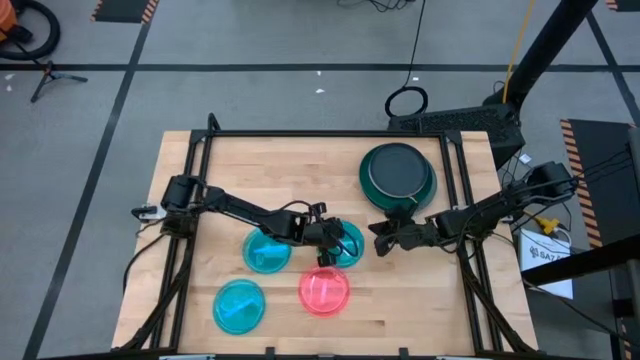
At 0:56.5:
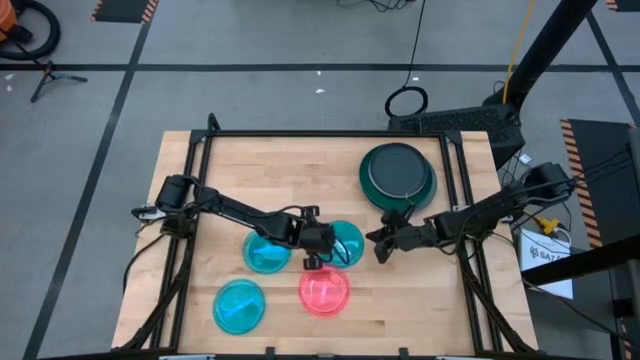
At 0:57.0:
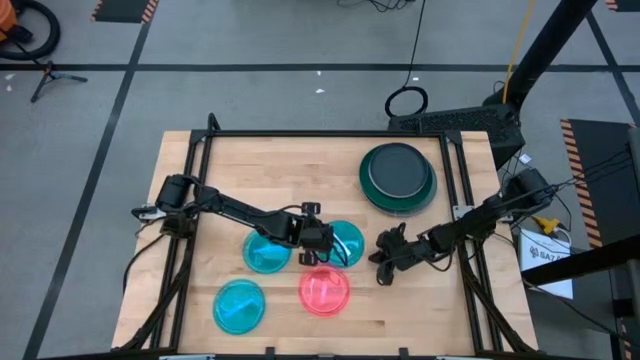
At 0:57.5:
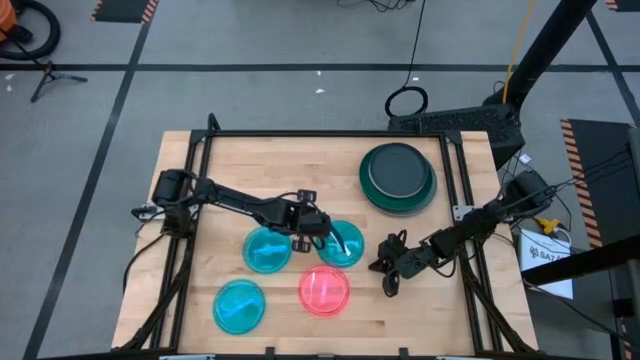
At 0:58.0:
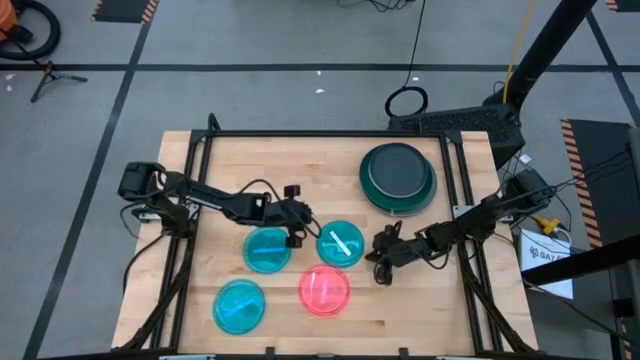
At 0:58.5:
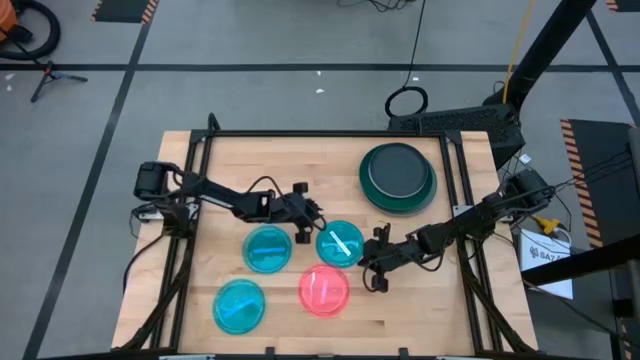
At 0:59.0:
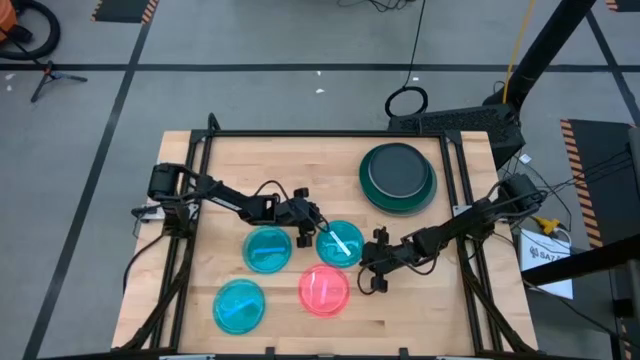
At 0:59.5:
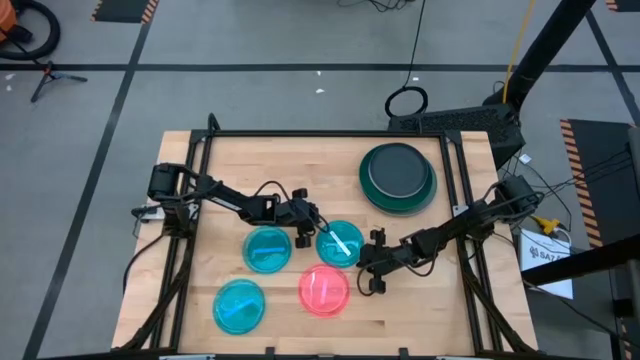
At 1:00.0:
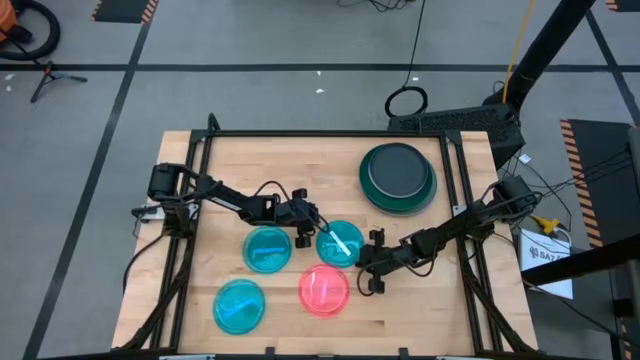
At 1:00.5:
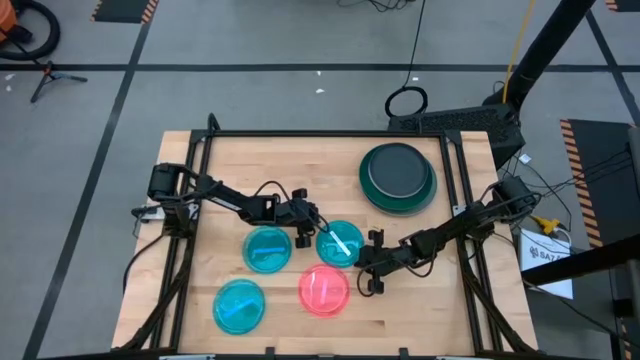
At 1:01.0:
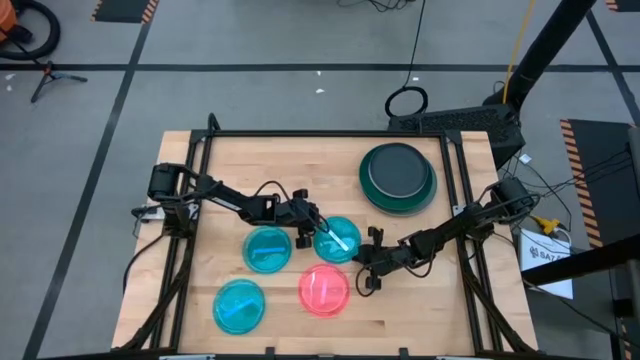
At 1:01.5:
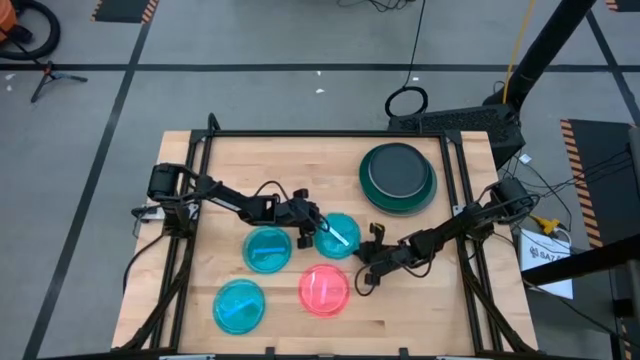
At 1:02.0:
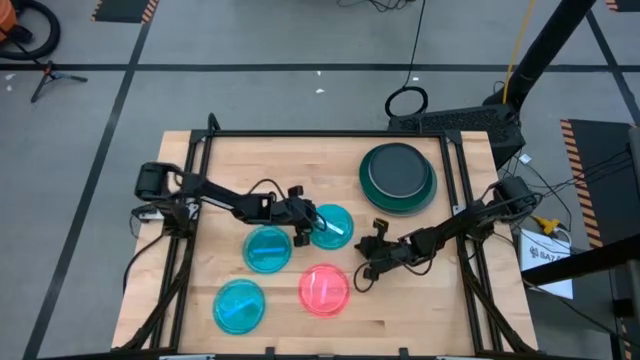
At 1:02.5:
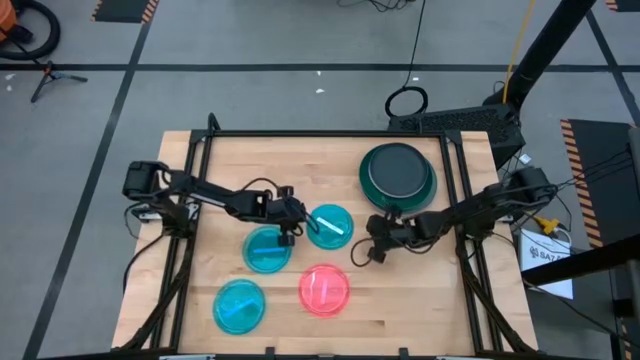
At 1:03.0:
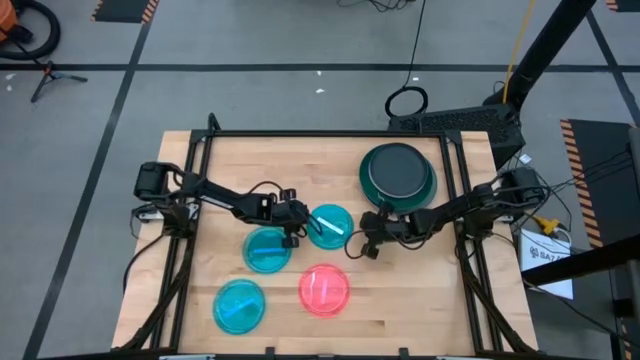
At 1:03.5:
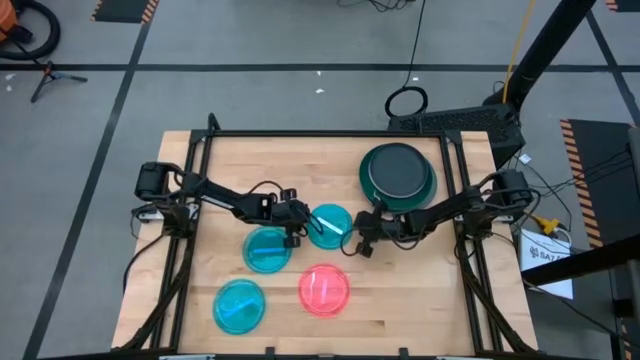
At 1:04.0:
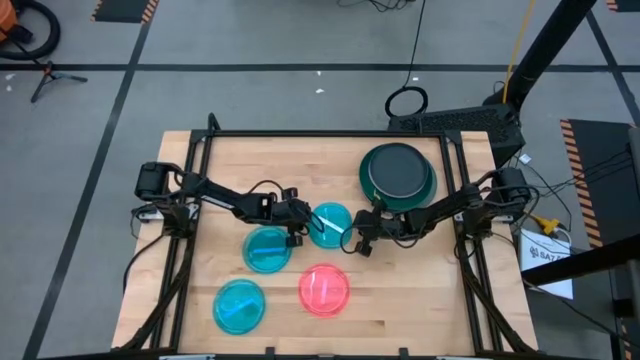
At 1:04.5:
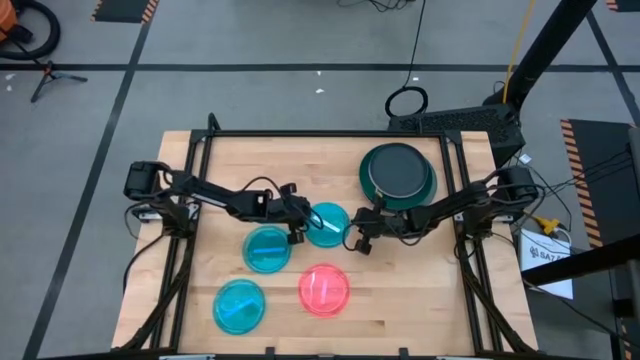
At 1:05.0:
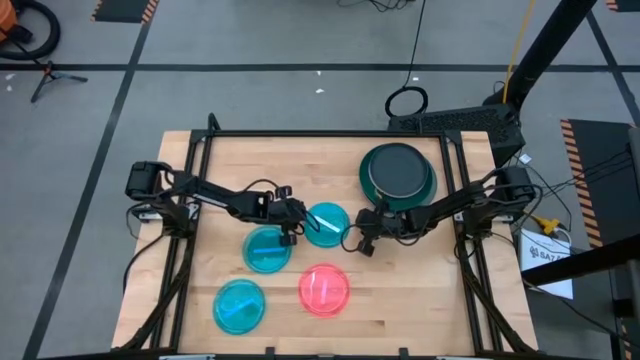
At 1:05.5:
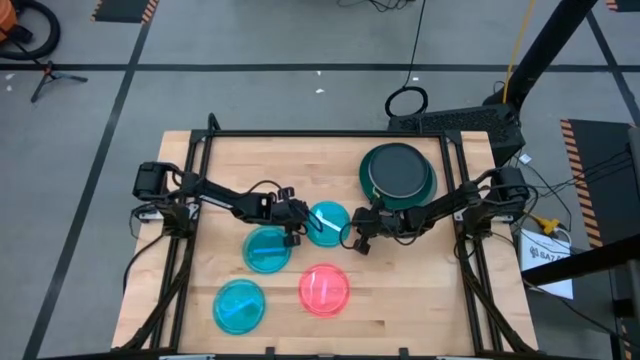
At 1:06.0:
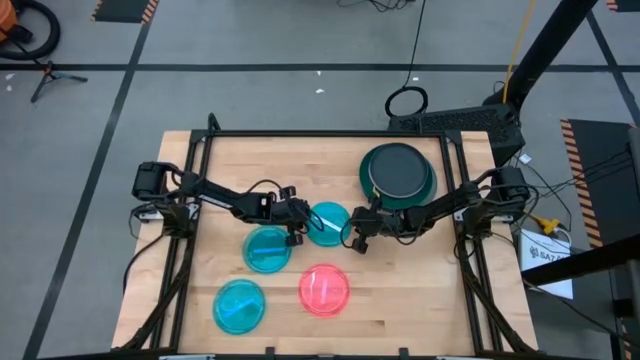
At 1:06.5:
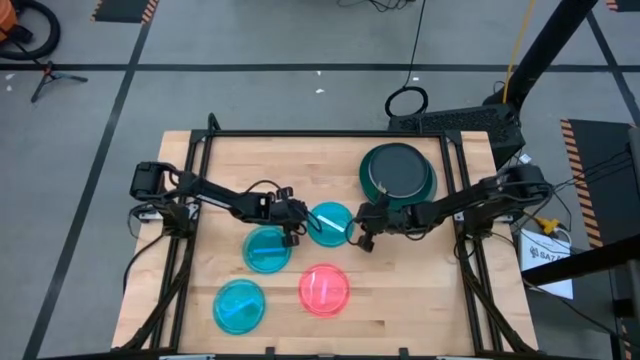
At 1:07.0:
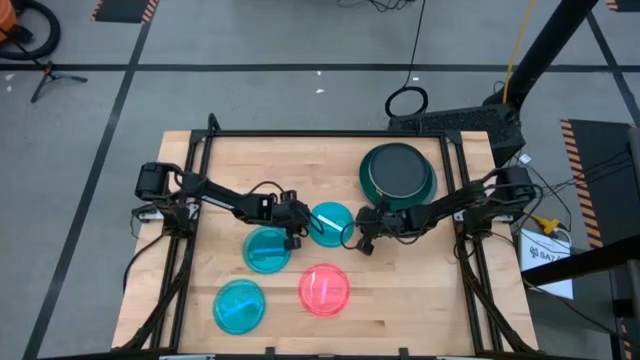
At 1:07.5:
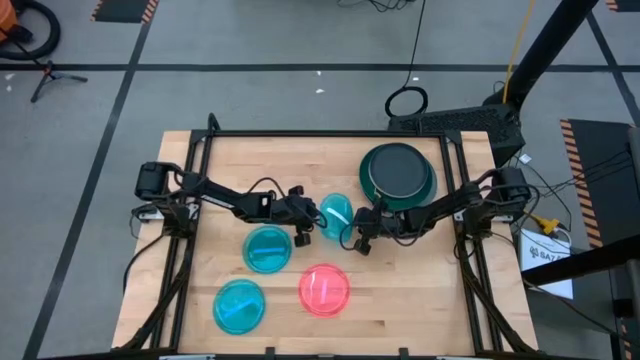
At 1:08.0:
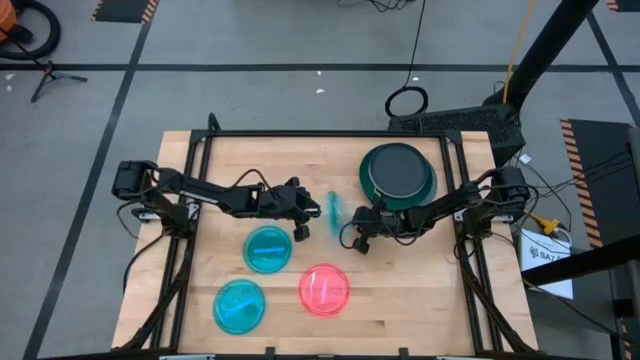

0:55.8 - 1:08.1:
Task: Stack plastic plates
Stack the right blue plate on the black plate

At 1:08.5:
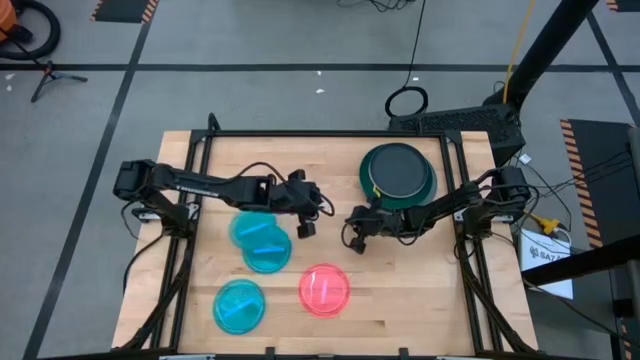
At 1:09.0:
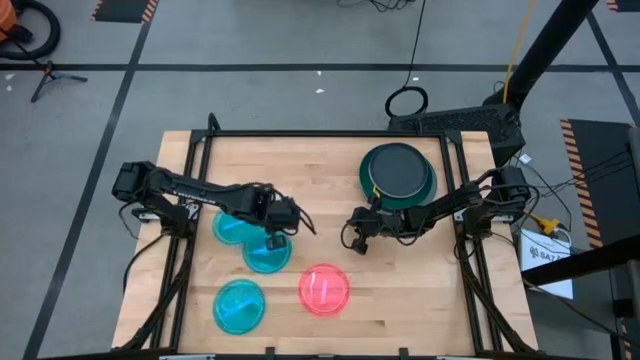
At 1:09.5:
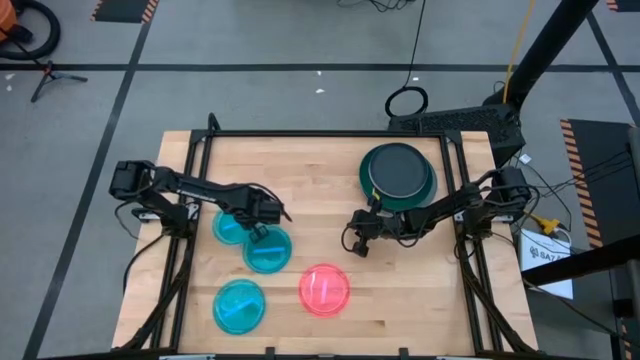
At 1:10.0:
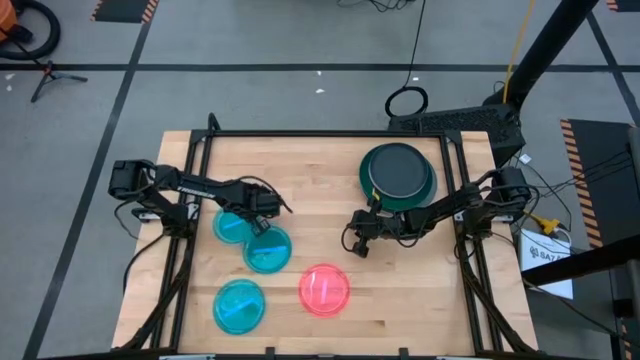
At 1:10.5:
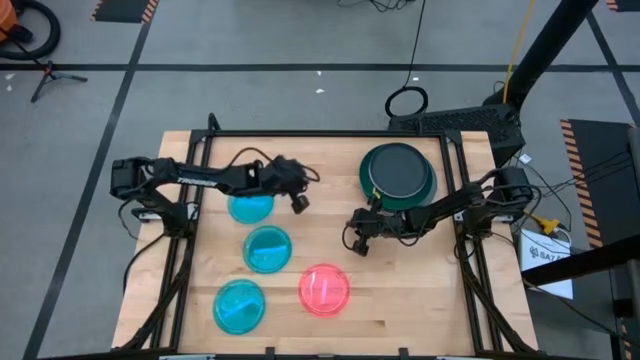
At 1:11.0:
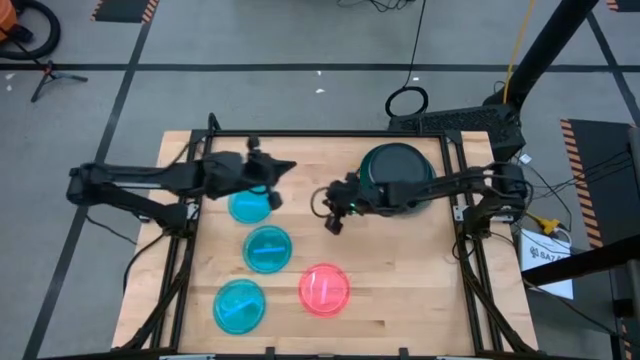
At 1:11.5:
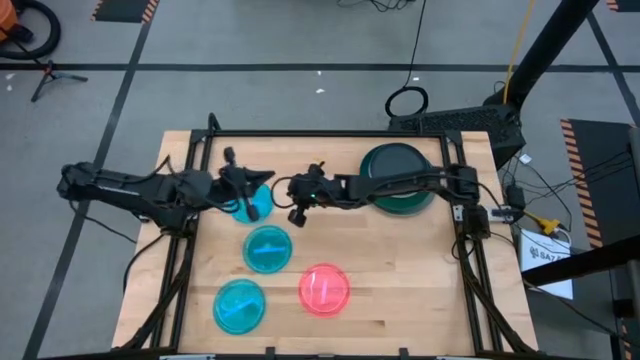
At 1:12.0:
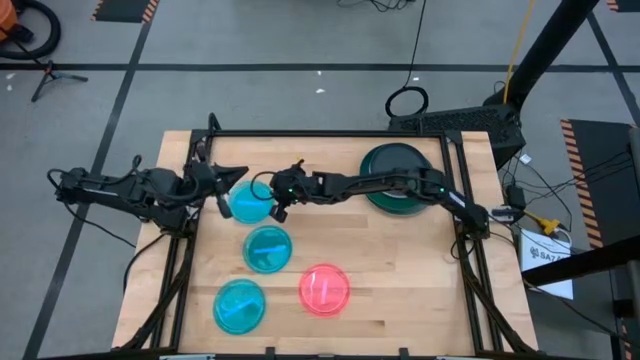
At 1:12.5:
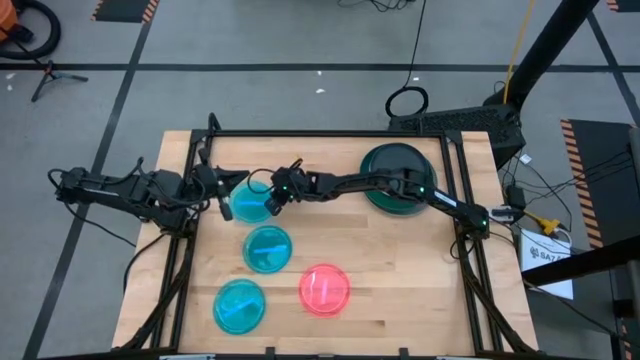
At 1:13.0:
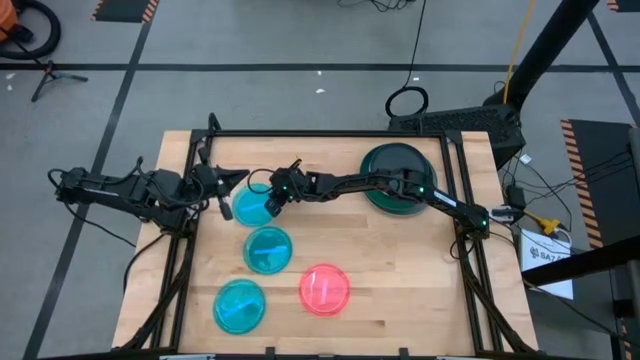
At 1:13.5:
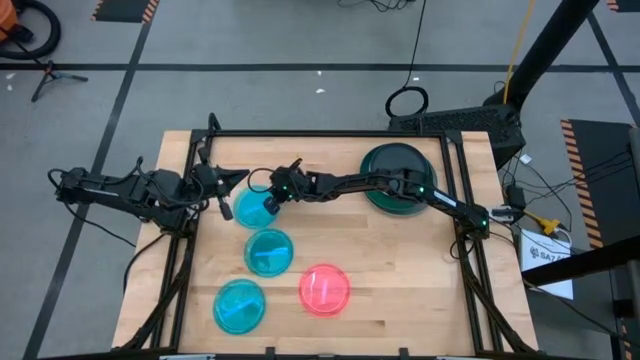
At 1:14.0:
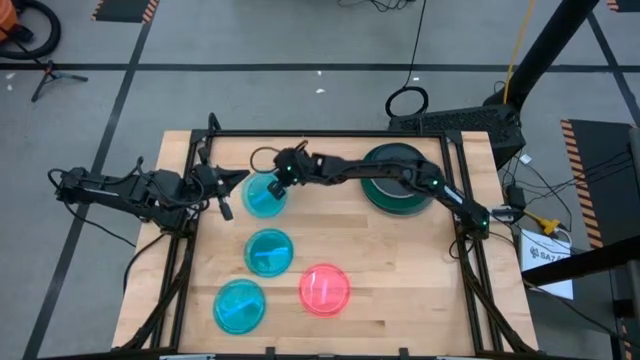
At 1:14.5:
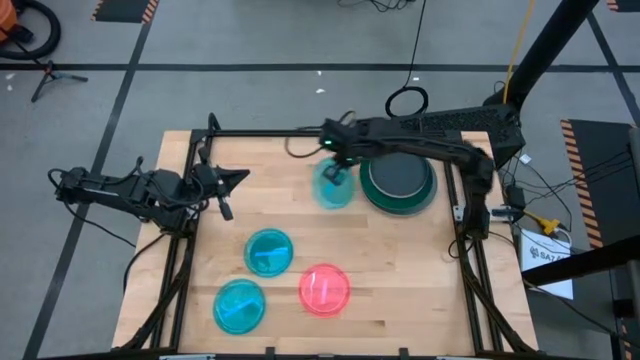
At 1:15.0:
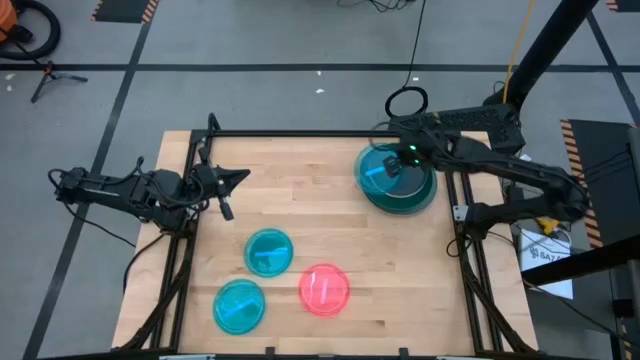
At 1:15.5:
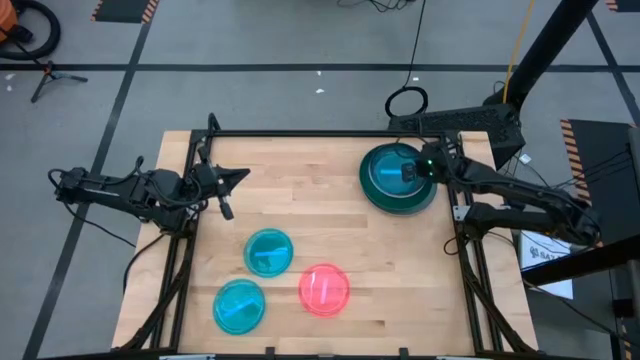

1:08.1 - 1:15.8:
Stack the right blue plate on the black plate
